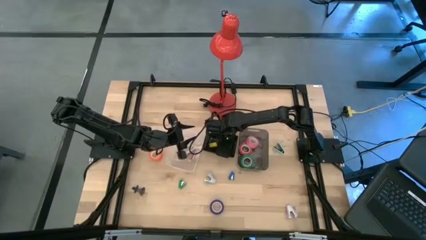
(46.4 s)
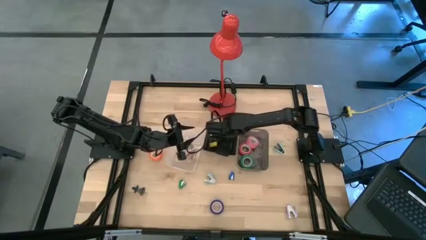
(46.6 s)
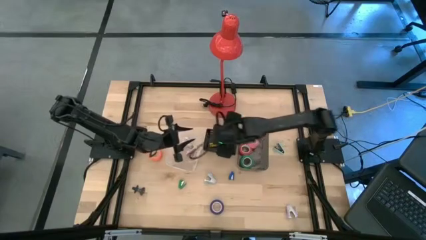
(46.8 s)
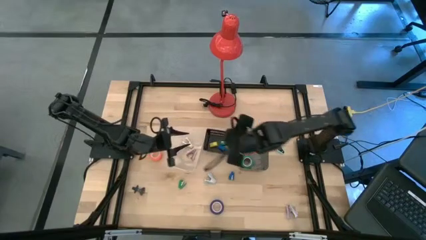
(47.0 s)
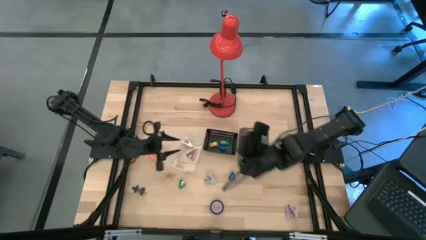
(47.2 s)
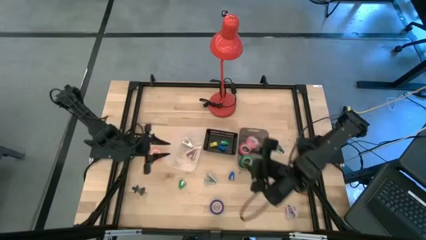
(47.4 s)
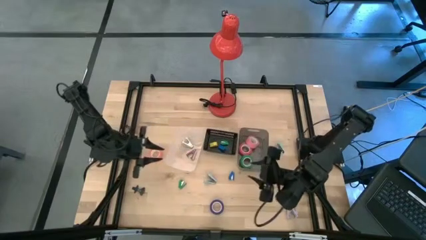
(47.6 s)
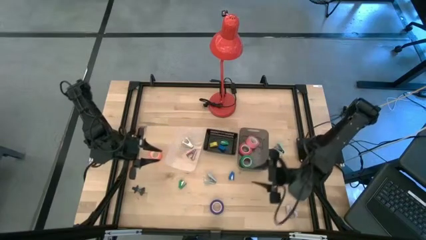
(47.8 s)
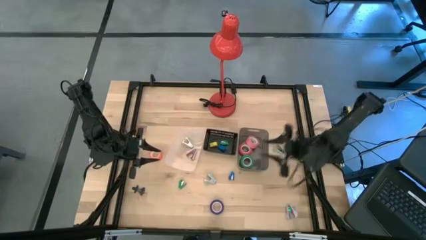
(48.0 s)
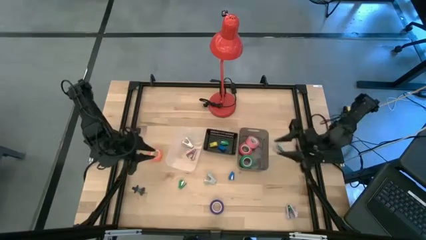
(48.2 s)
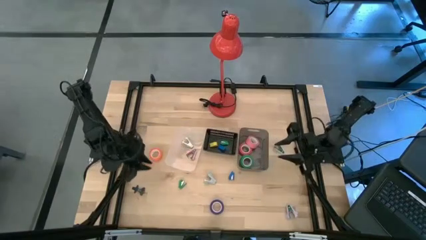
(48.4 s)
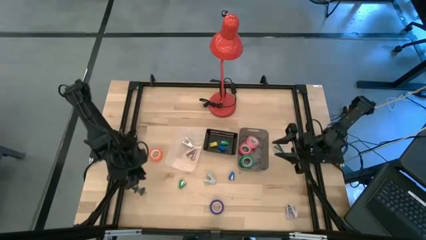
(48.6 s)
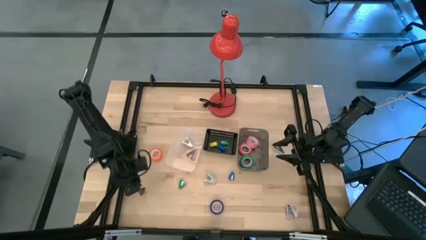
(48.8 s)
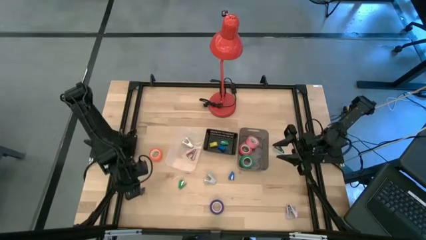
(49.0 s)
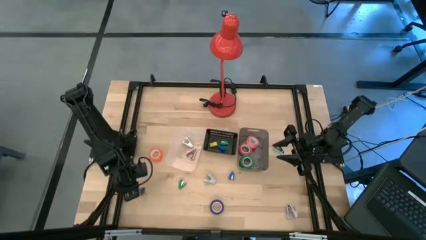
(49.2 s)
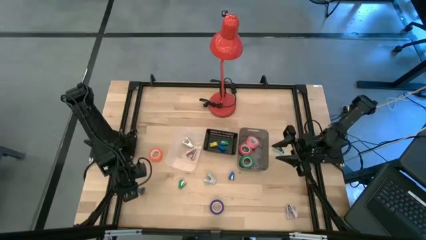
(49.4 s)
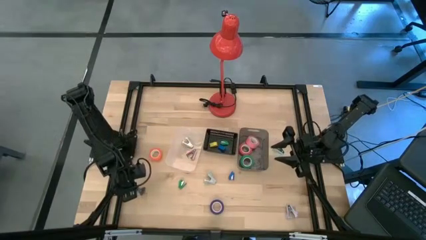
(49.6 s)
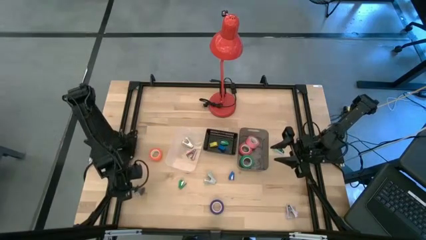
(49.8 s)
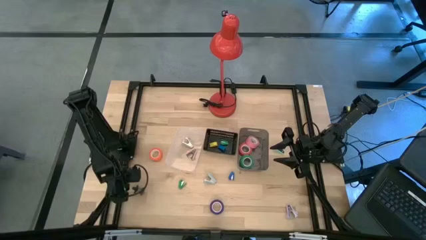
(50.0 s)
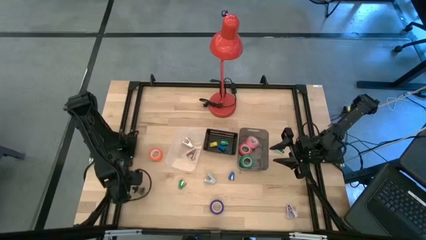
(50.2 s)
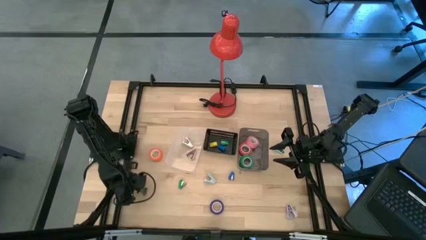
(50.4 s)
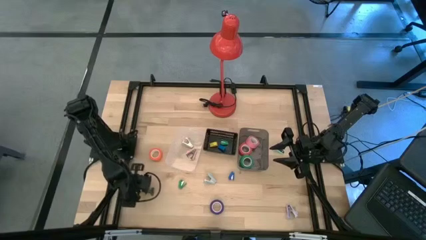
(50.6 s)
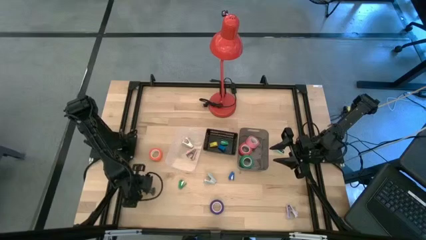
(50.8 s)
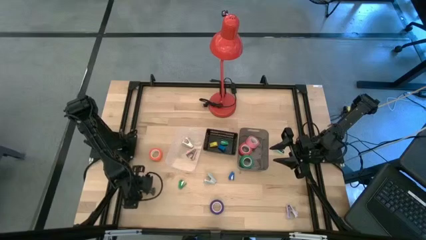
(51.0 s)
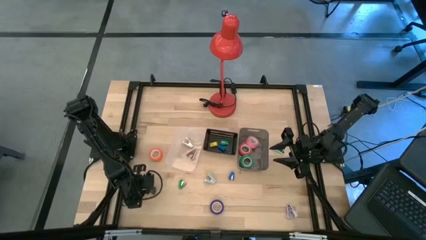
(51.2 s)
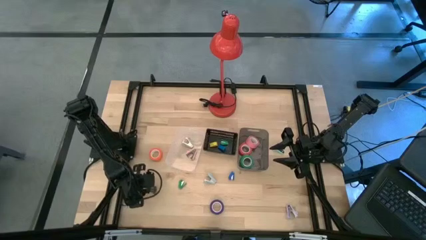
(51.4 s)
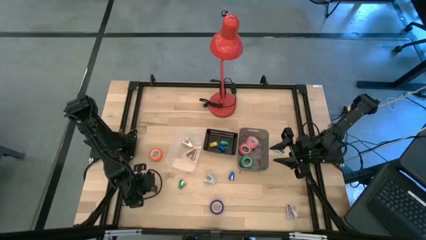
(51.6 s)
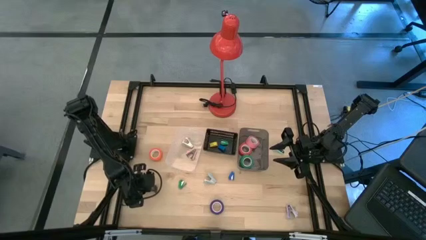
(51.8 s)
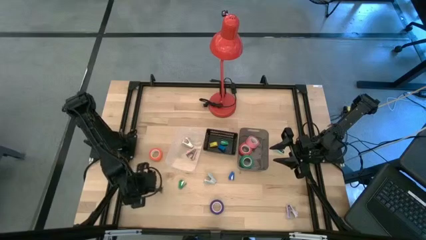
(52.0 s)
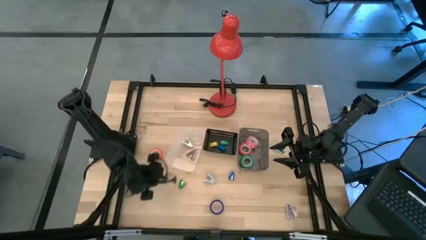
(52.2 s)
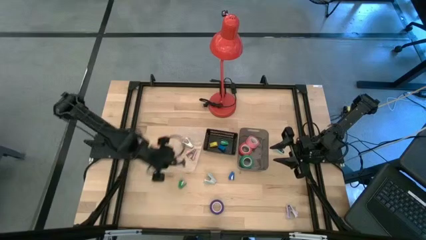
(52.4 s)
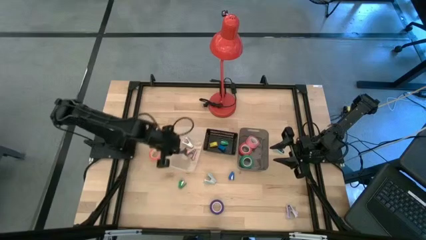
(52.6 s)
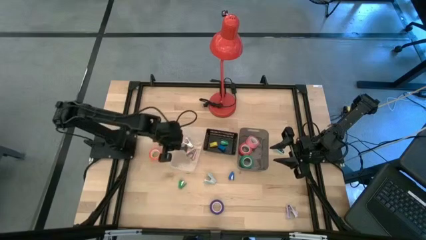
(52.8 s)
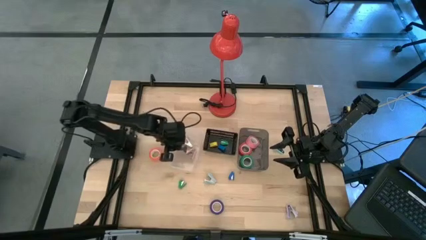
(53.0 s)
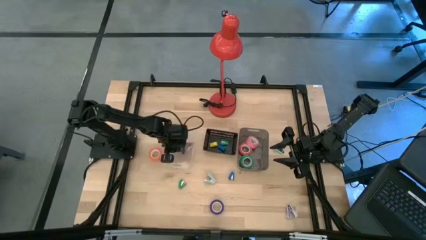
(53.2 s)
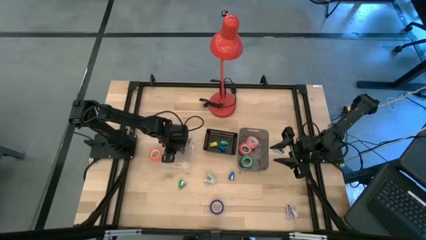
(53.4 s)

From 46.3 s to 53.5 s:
Task: Pick and place Stapler, Stapler remover, tape
Put the black staple remover into the transparent bin

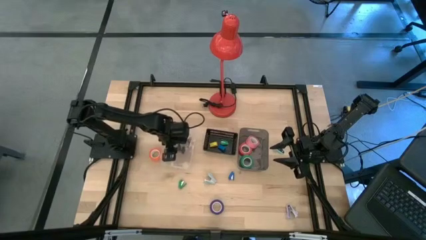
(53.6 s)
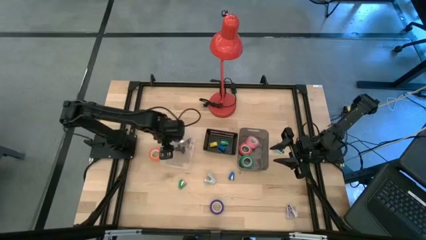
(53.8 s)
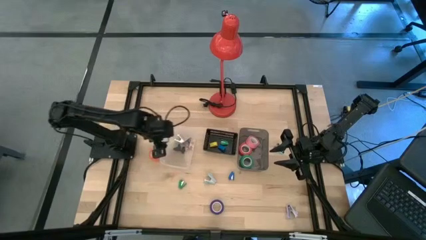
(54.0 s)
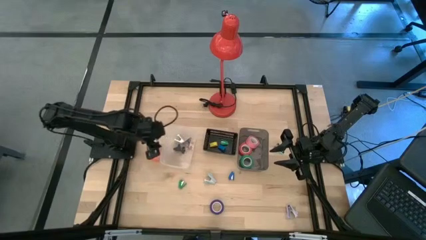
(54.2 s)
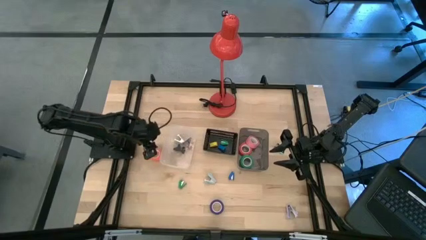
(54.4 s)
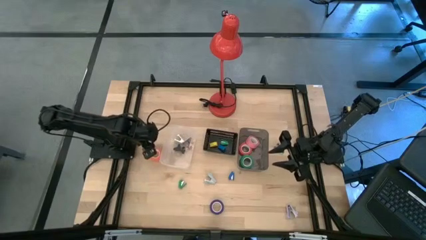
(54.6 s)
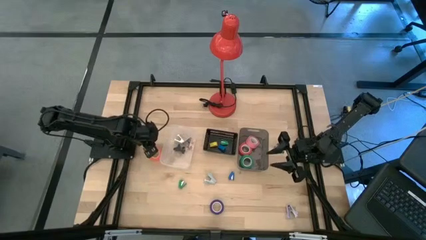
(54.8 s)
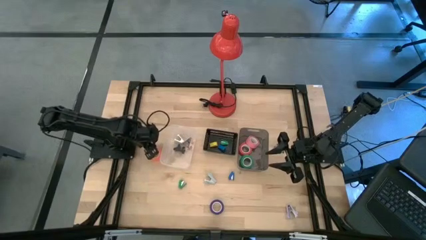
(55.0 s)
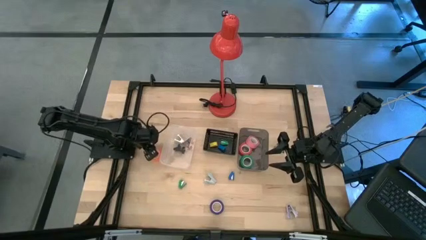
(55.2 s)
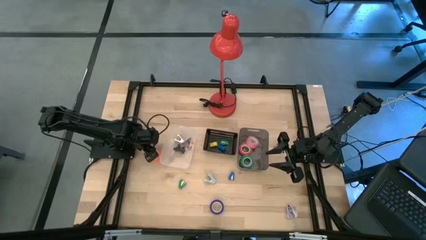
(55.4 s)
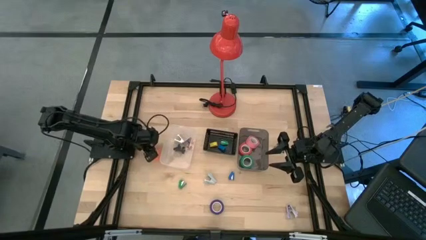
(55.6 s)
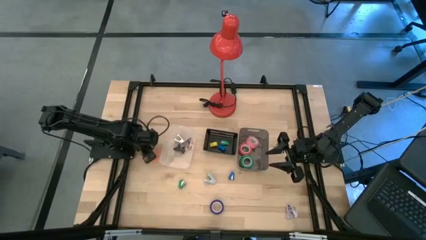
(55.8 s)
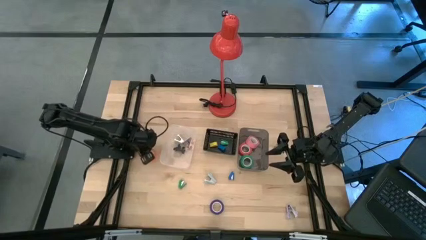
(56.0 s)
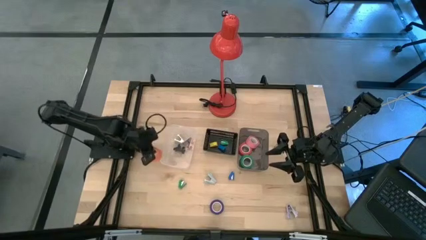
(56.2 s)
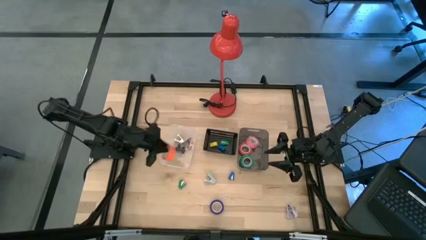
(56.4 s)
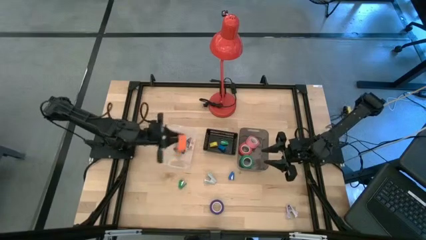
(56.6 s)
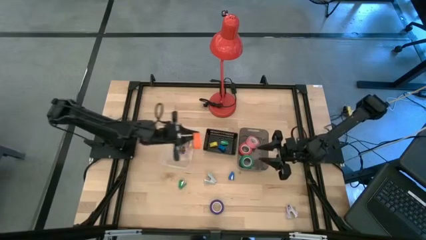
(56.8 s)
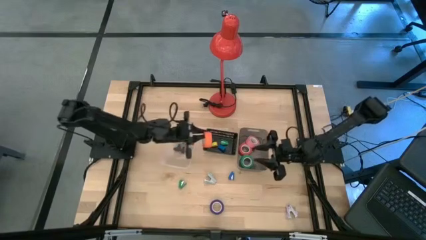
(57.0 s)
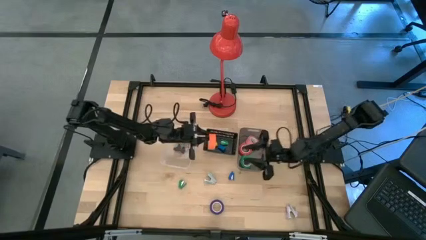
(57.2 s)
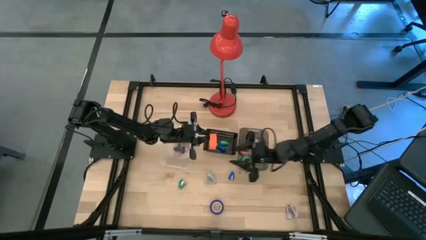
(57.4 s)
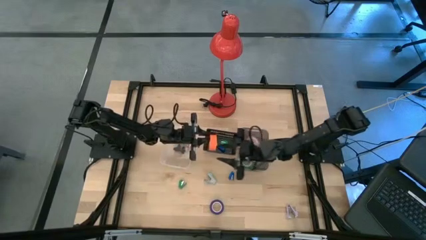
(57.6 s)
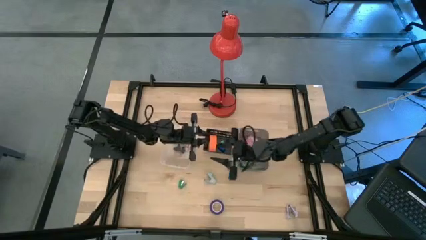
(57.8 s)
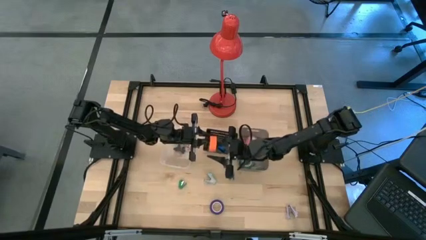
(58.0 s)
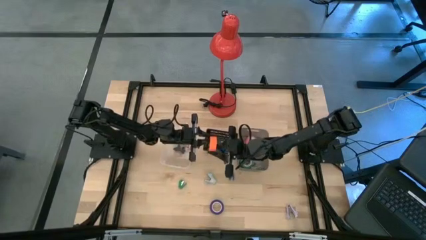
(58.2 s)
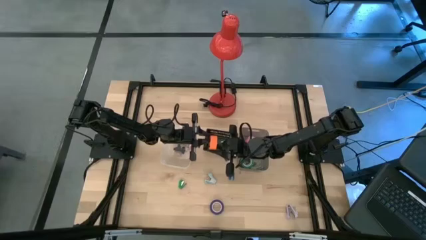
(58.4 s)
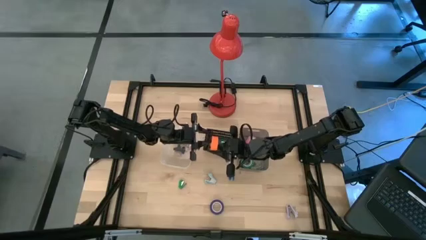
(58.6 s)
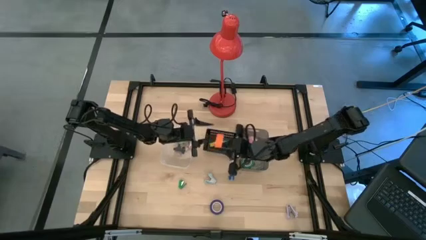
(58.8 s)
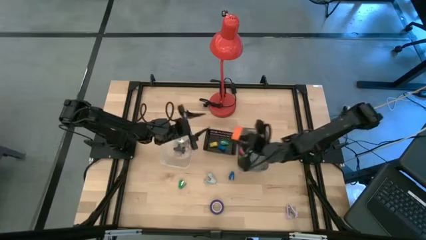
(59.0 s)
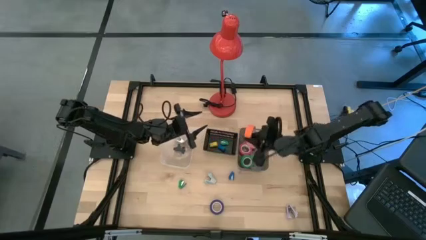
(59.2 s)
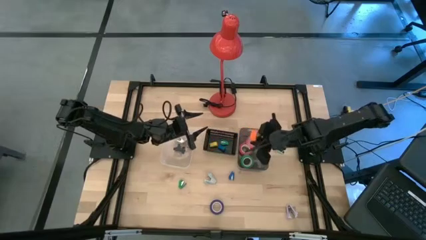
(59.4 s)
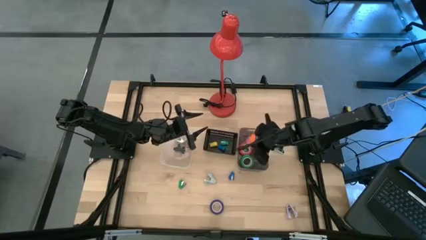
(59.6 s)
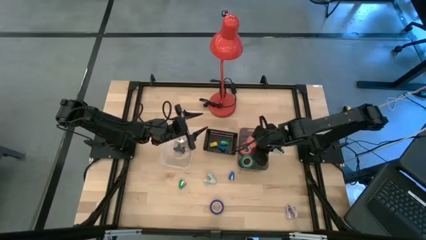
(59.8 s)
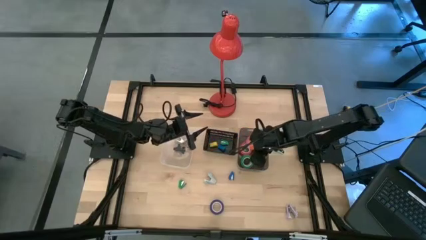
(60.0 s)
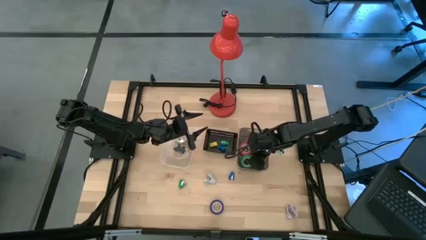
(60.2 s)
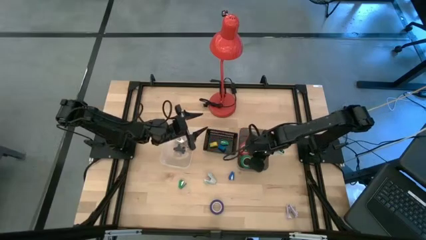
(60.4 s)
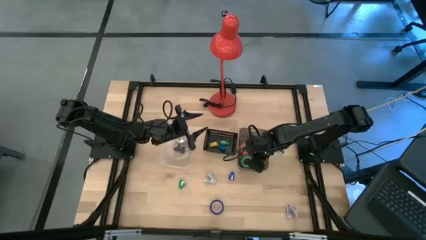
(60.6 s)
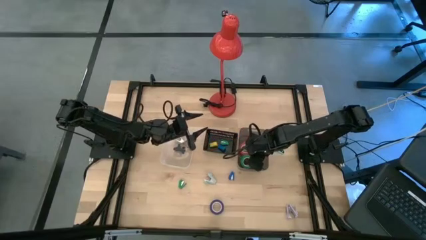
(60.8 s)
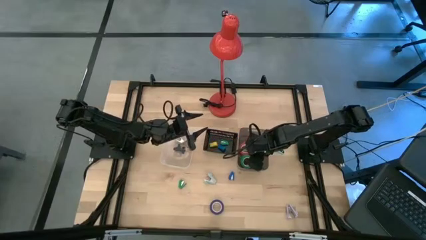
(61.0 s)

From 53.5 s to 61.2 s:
Put the orange tape into the black bin
